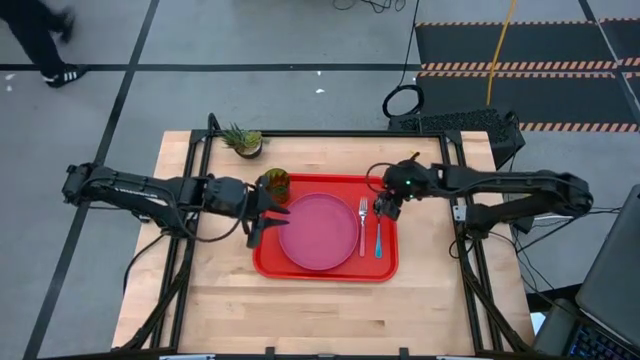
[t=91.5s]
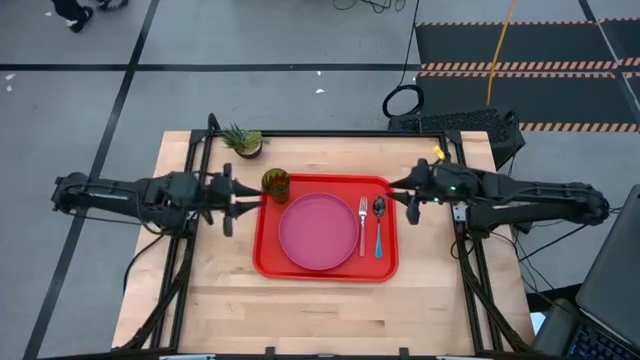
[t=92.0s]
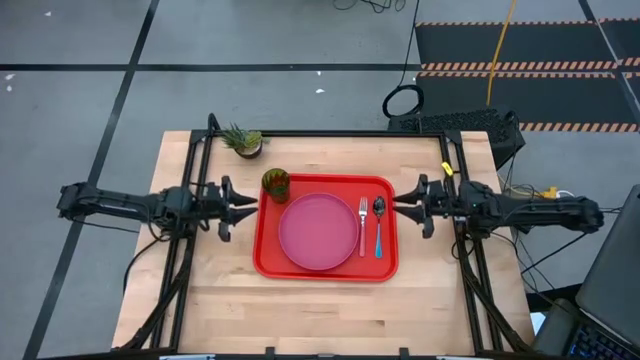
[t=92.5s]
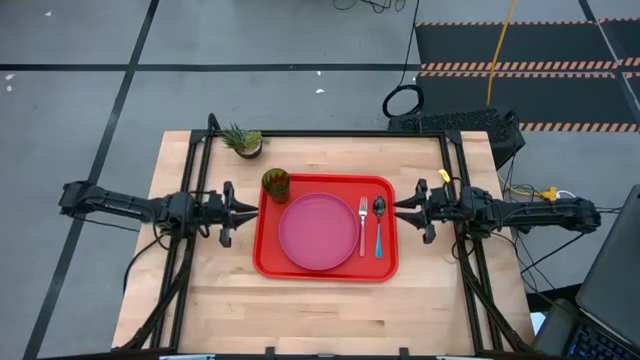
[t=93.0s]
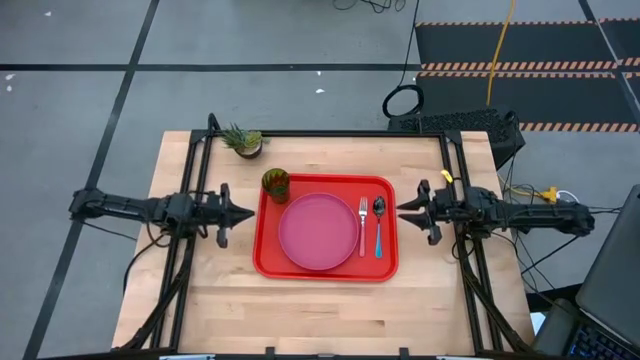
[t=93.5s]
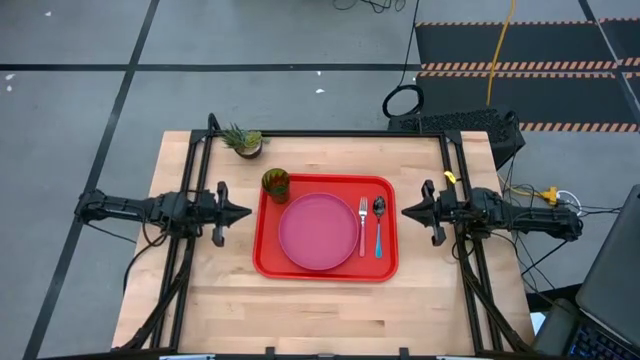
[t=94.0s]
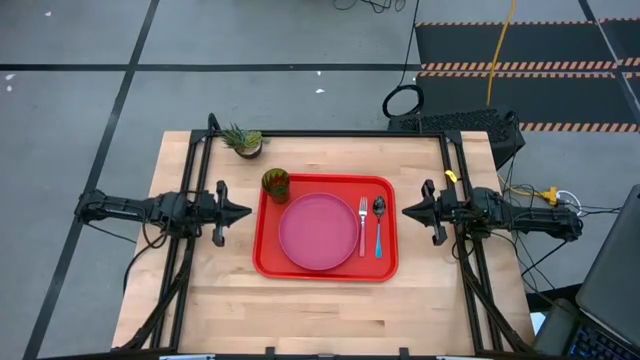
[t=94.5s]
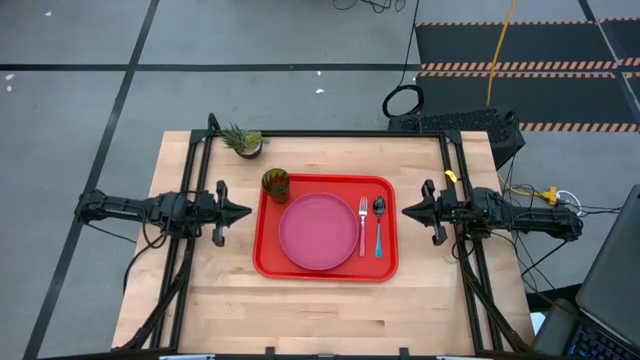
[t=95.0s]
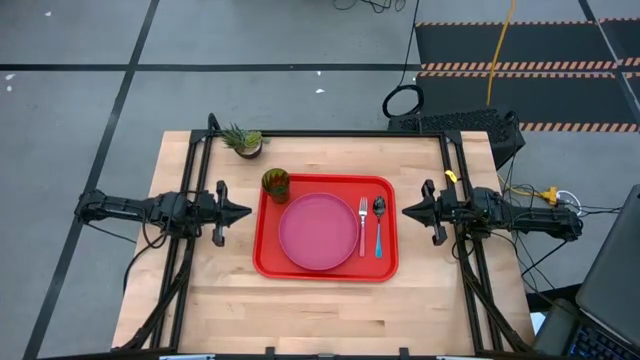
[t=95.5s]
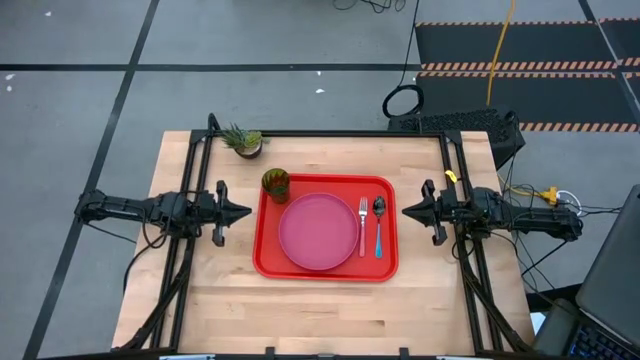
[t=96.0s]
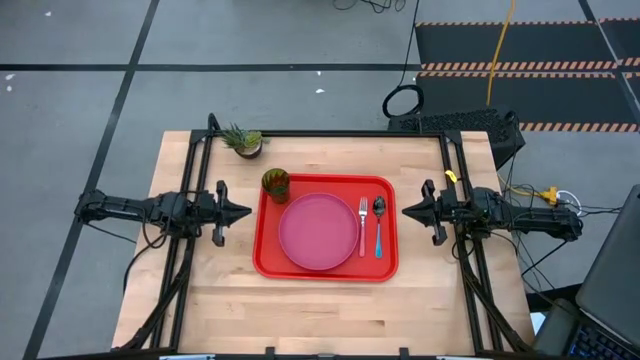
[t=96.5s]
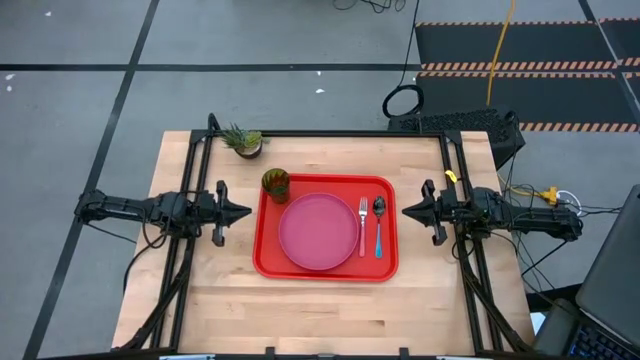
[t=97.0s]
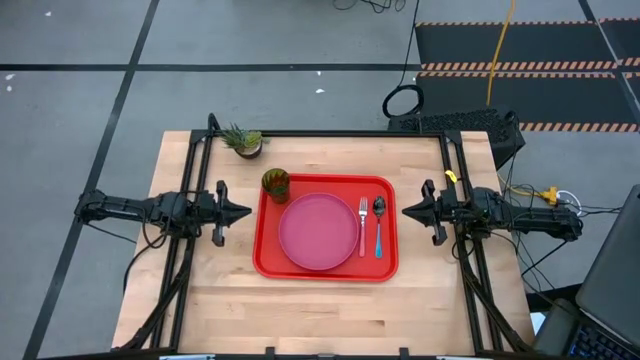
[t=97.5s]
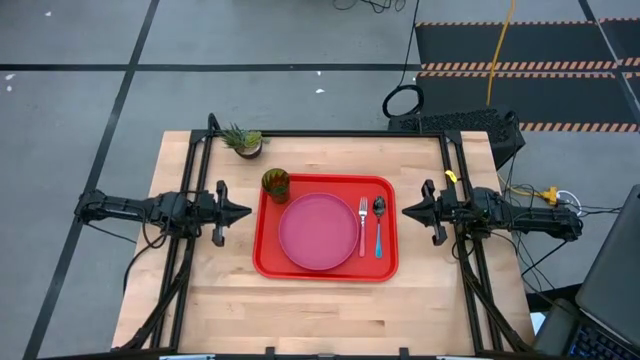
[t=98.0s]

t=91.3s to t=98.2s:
Task: Pick and place plate/cup/fork/spoon on tray
Return to Home Position

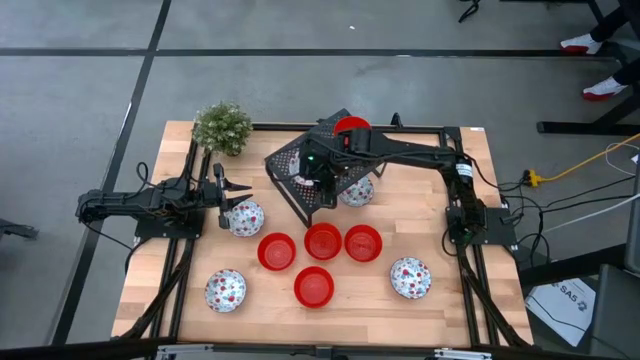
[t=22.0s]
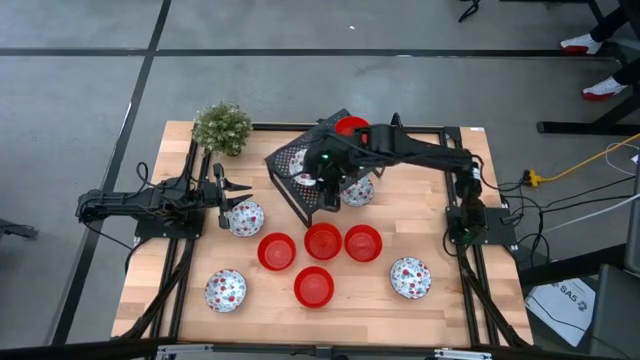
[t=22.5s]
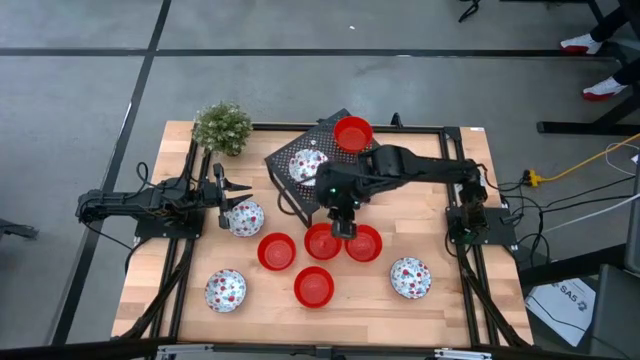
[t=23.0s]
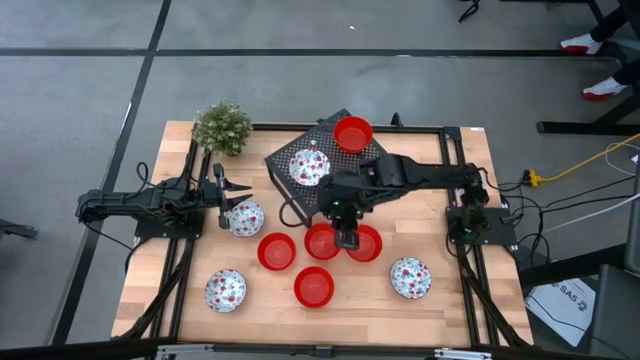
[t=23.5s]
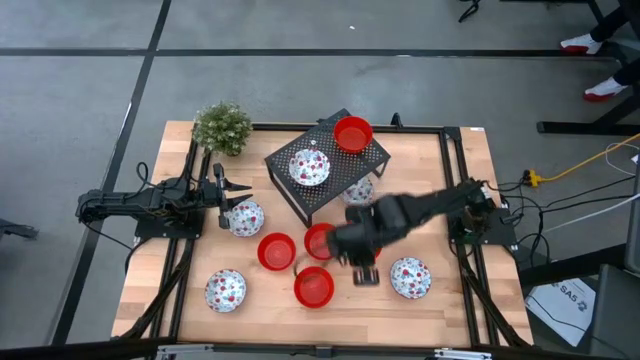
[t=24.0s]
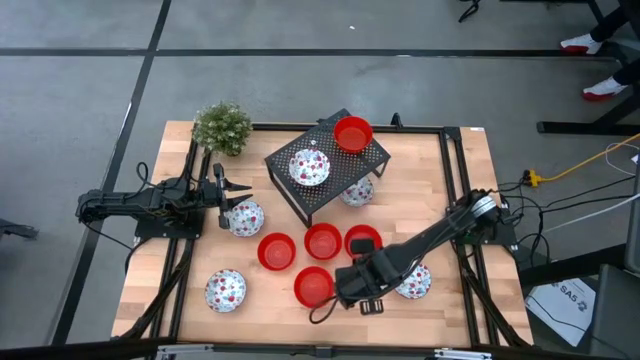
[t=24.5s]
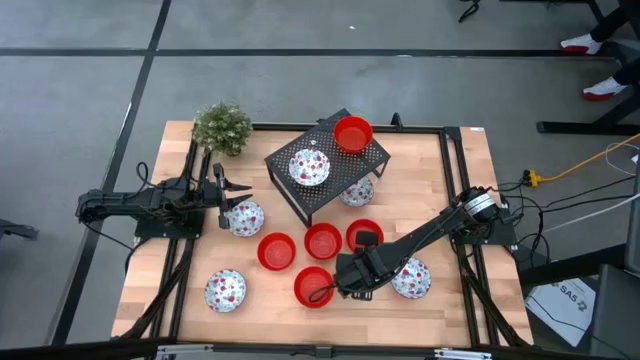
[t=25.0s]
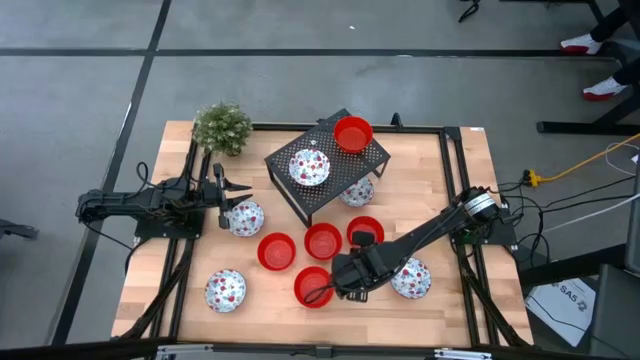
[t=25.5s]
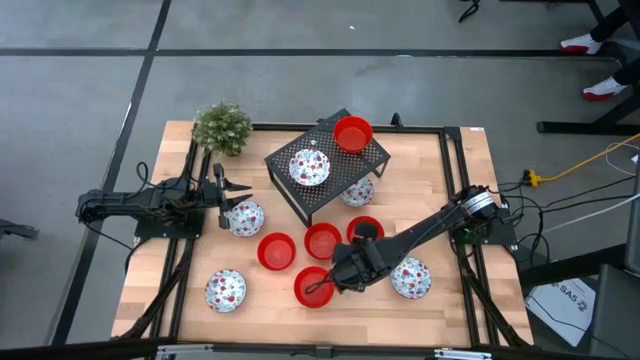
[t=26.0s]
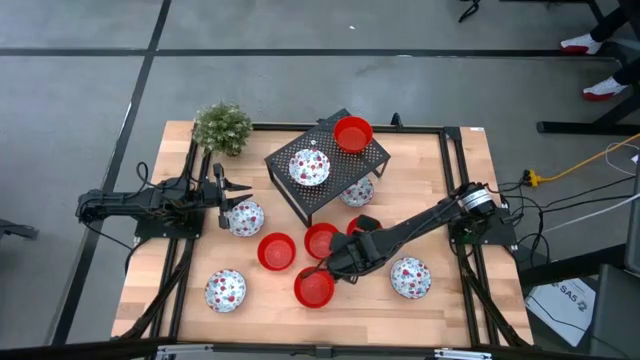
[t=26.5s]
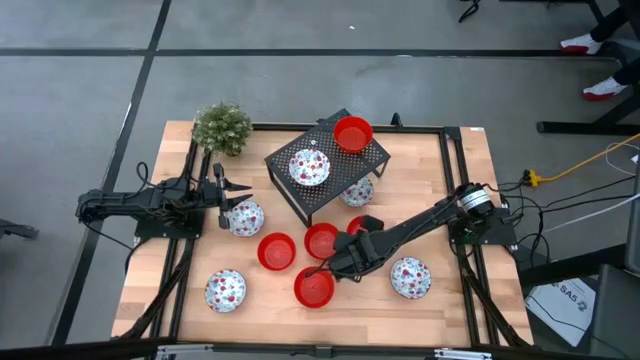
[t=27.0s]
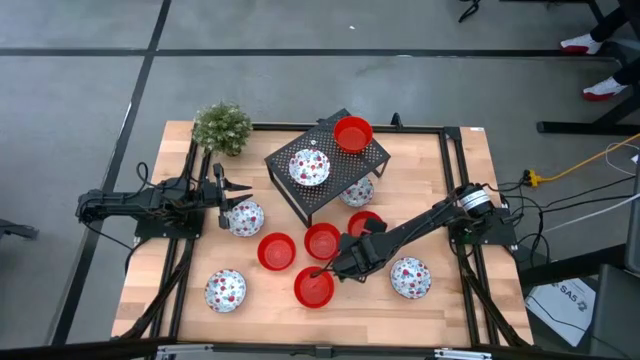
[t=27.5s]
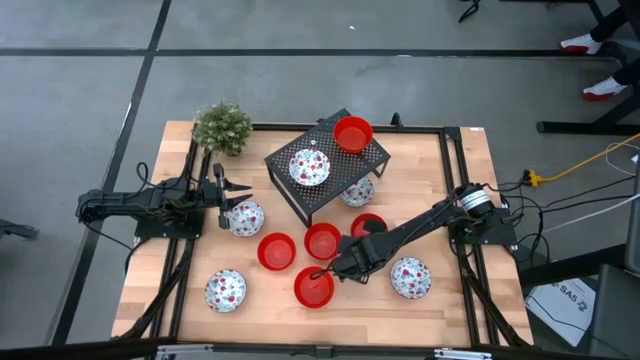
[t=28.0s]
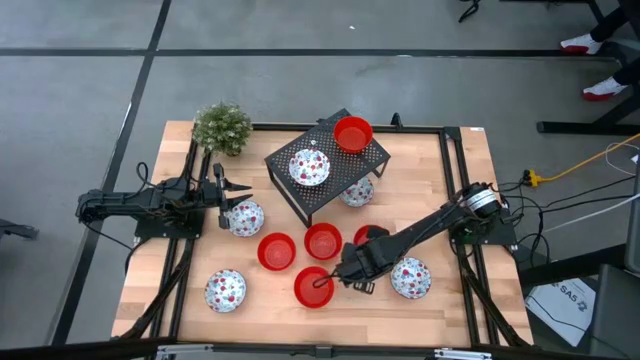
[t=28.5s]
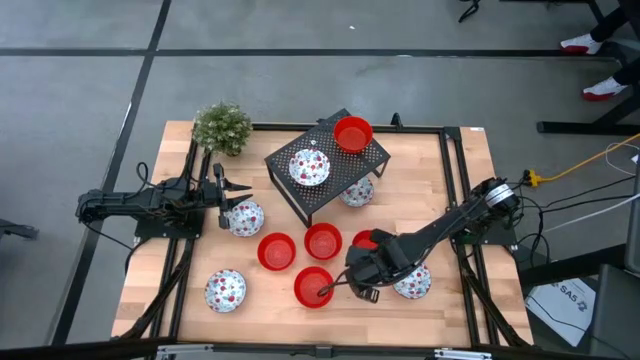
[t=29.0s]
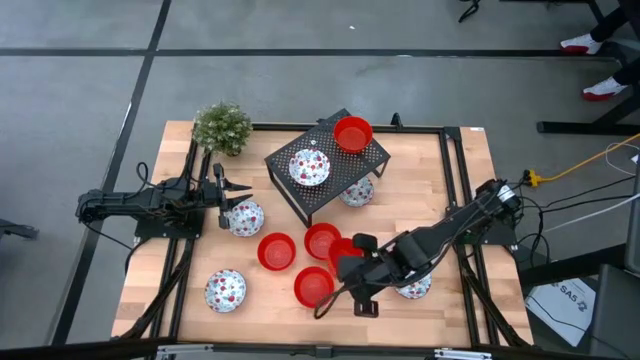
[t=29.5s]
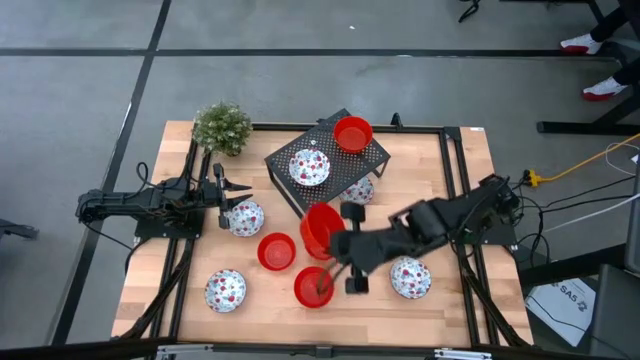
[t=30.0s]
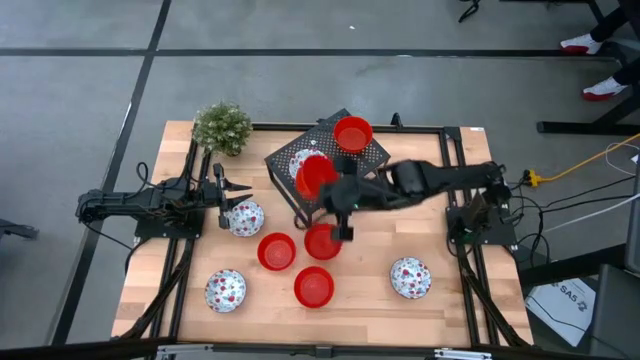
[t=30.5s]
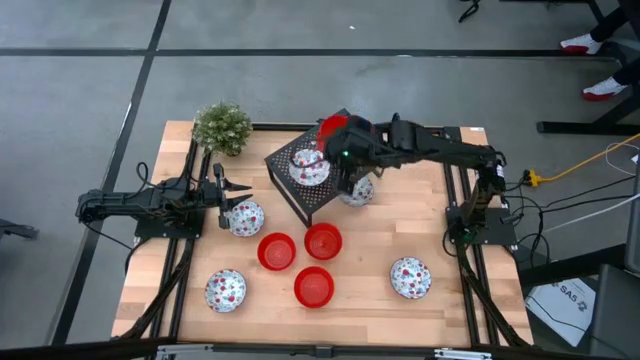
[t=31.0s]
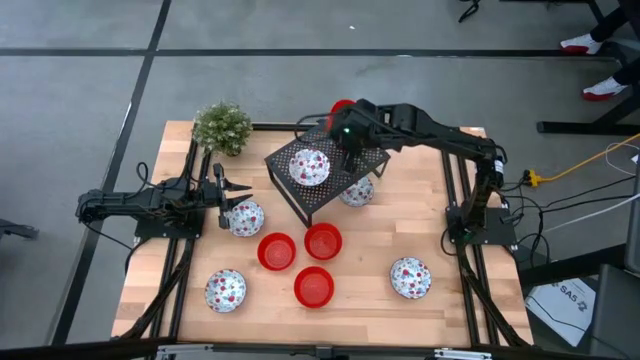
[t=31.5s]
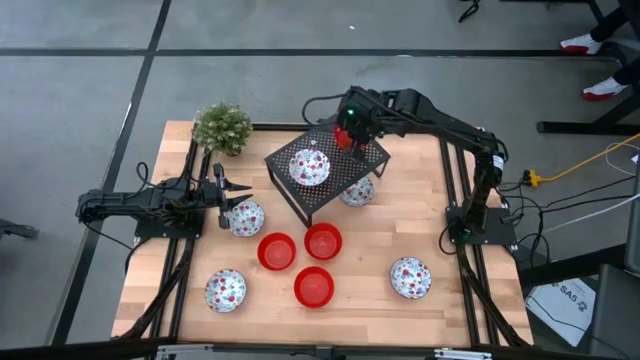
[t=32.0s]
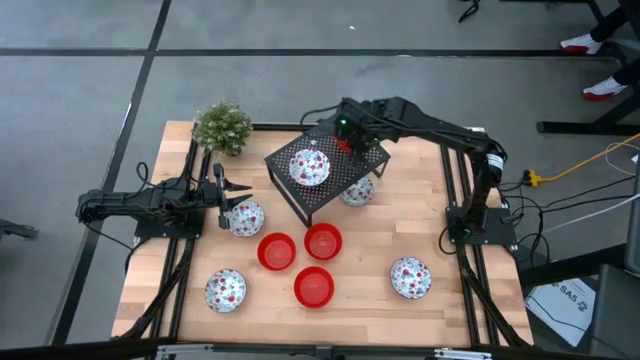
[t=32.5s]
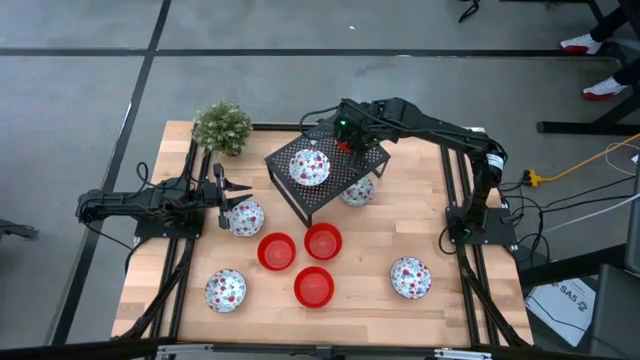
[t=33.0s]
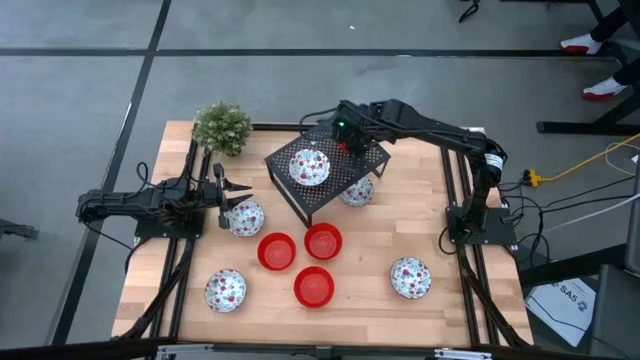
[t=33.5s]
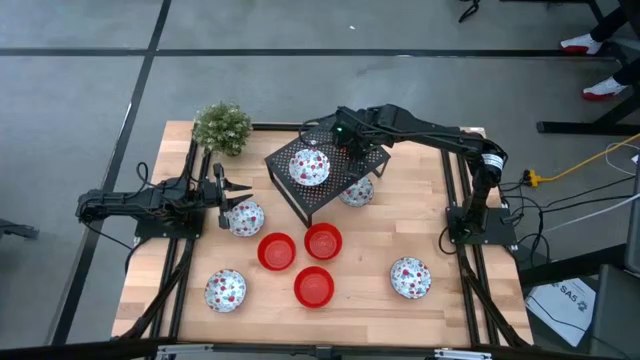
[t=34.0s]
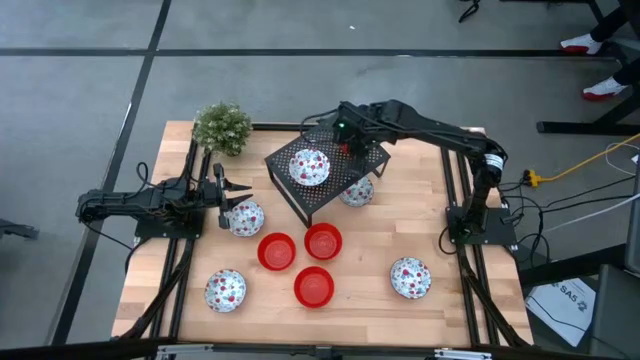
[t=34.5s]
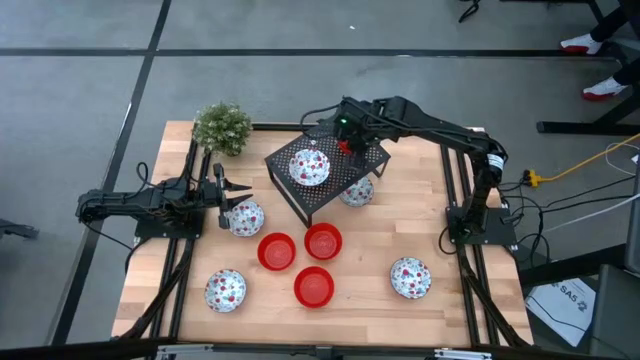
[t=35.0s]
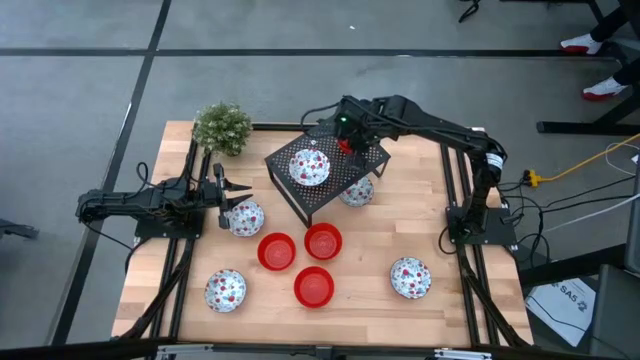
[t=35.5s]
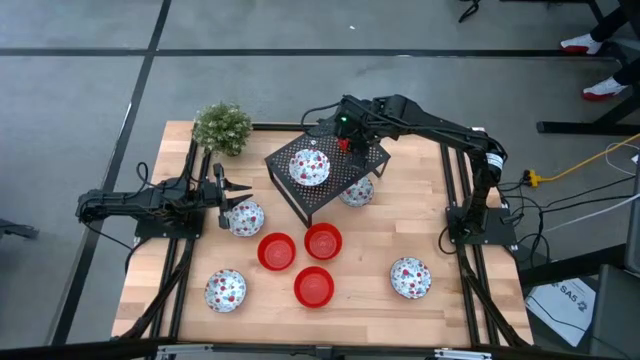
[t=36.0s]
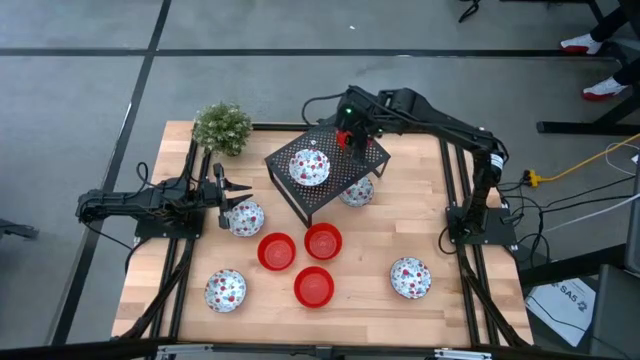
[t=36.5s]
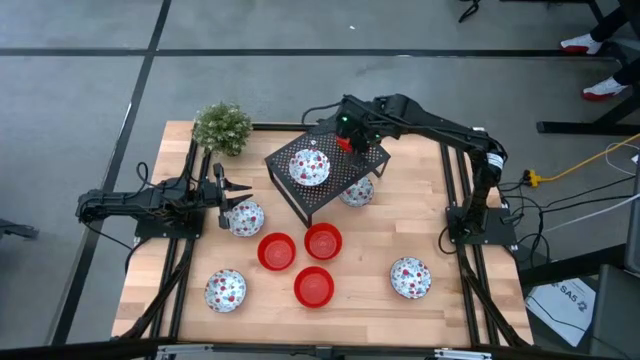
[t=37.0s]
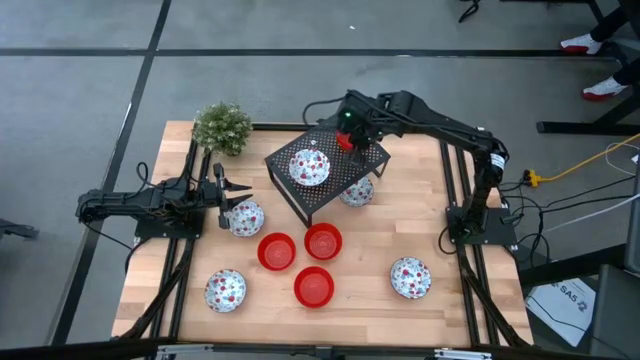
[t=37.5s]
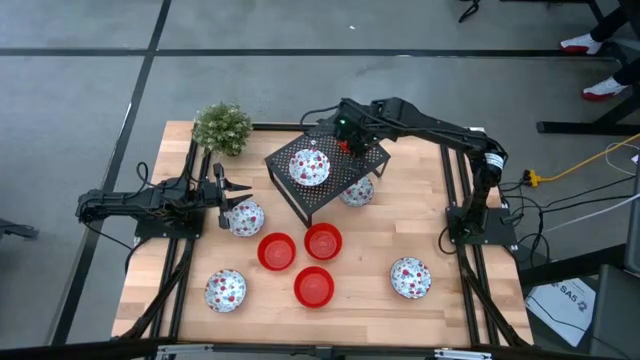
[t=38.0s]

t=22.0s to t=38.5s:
Task: Pick & Place Mini bowls
Stack the red bowl on the red bowl on the shelf
